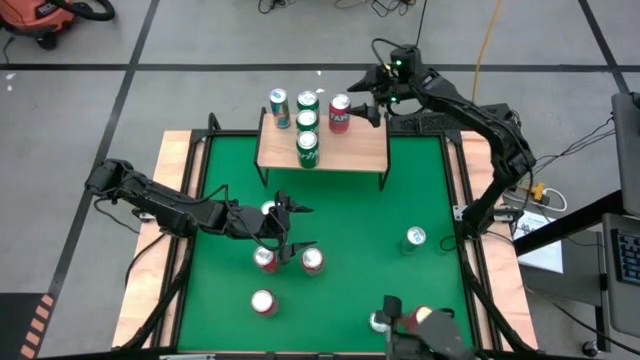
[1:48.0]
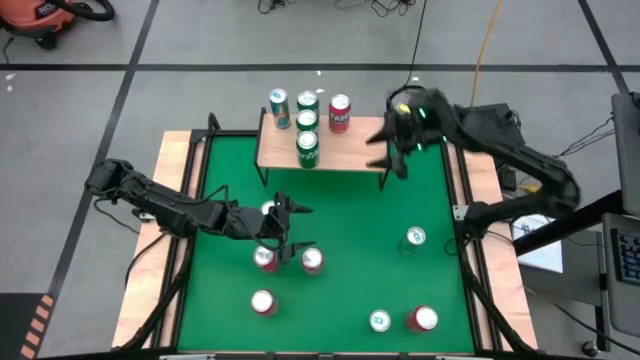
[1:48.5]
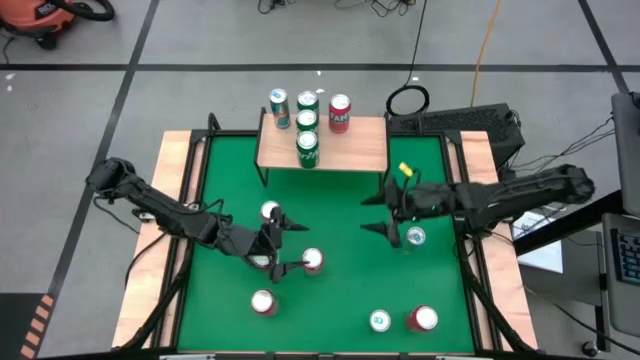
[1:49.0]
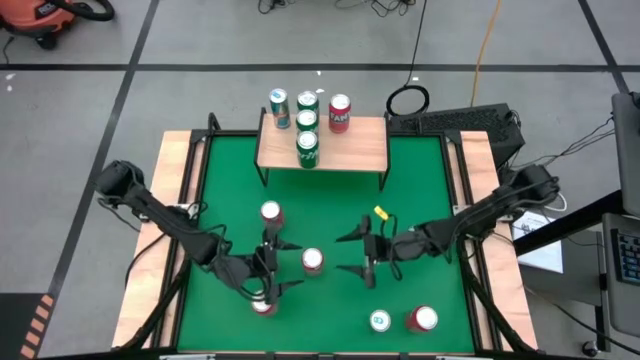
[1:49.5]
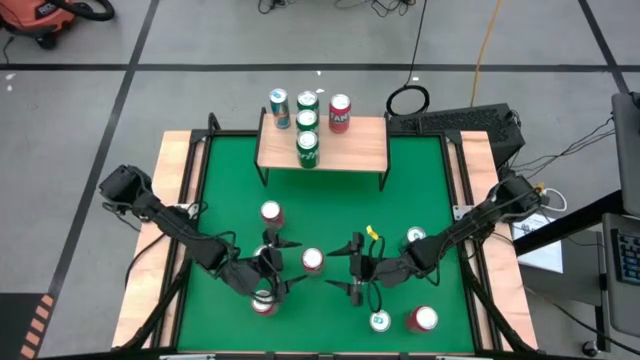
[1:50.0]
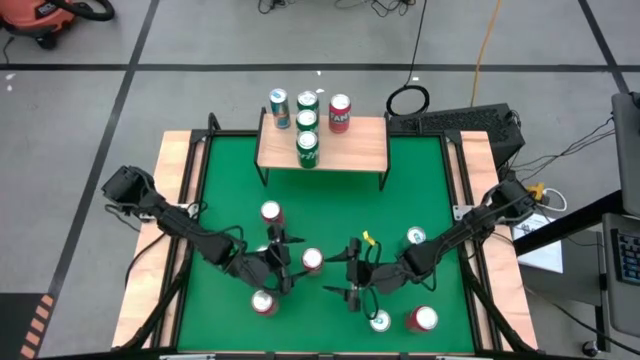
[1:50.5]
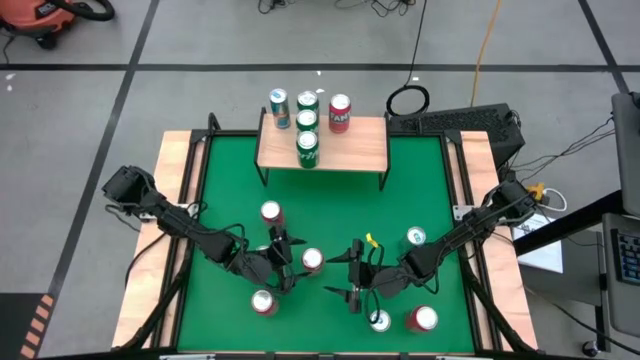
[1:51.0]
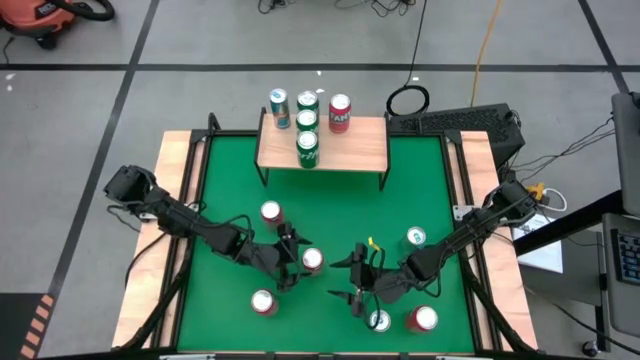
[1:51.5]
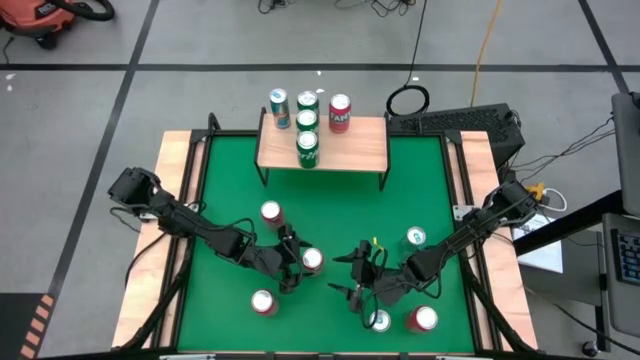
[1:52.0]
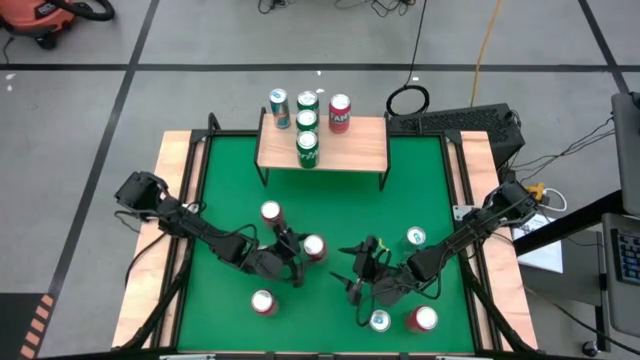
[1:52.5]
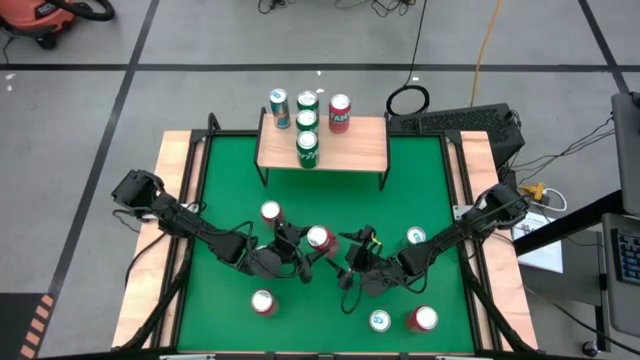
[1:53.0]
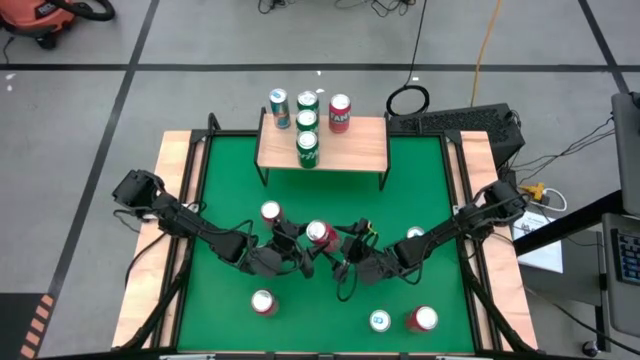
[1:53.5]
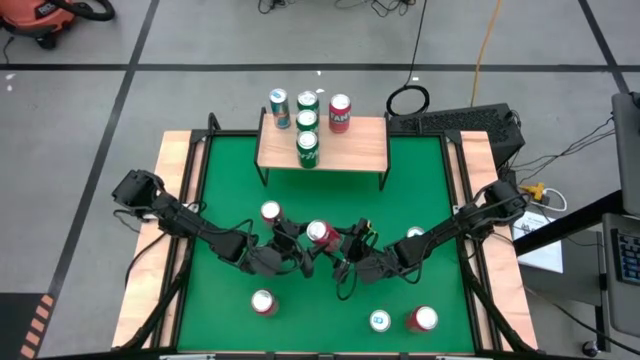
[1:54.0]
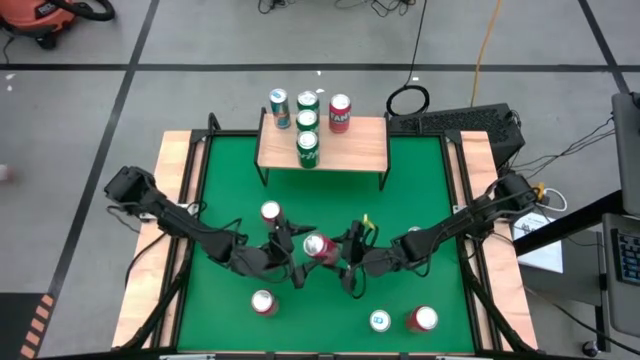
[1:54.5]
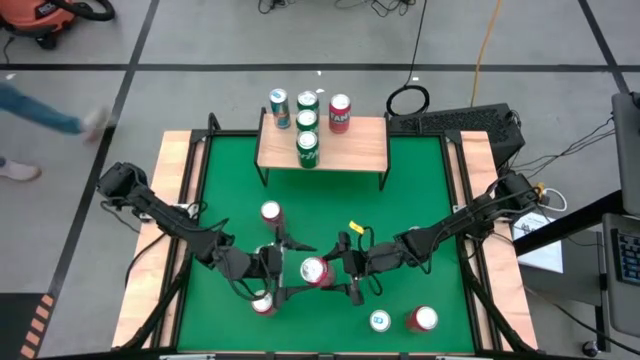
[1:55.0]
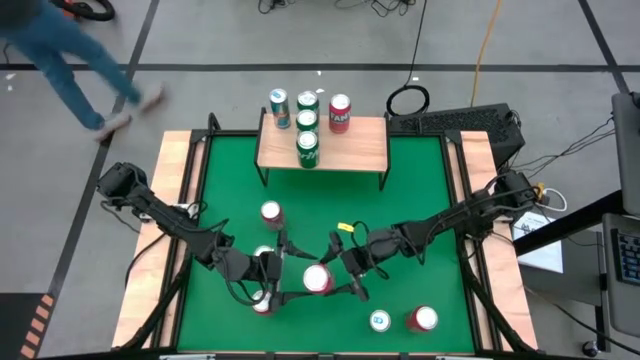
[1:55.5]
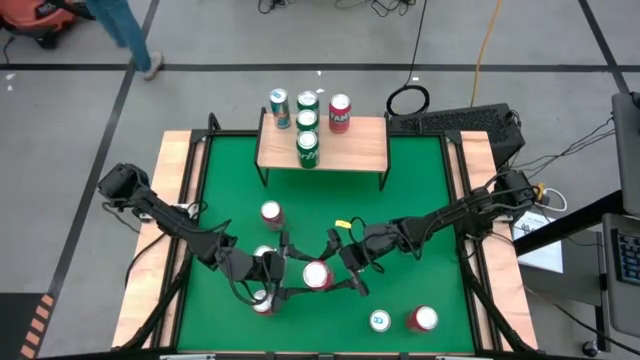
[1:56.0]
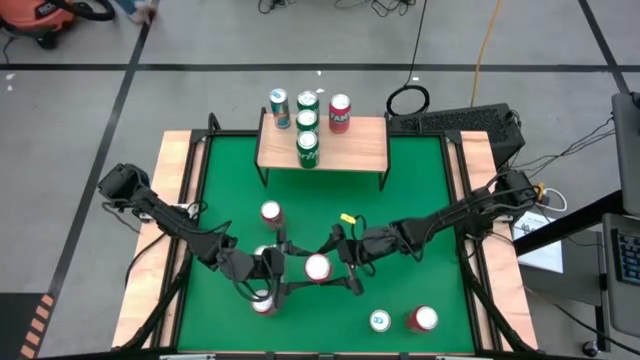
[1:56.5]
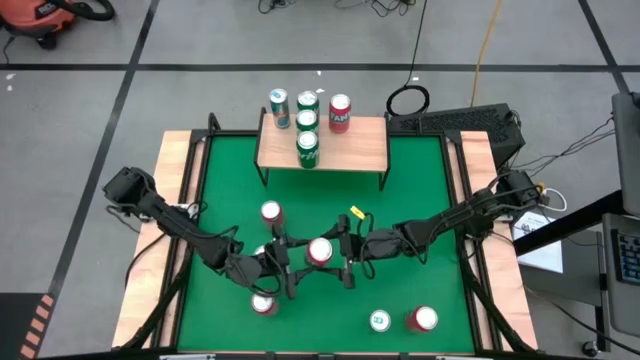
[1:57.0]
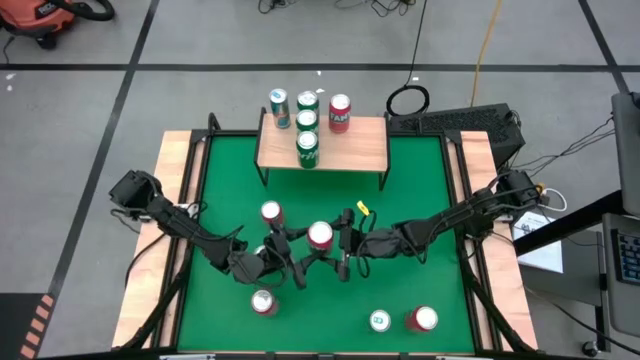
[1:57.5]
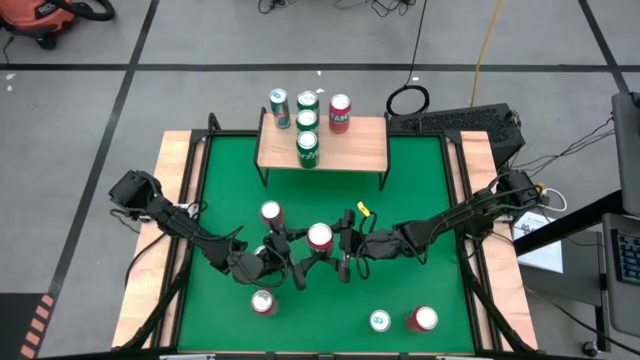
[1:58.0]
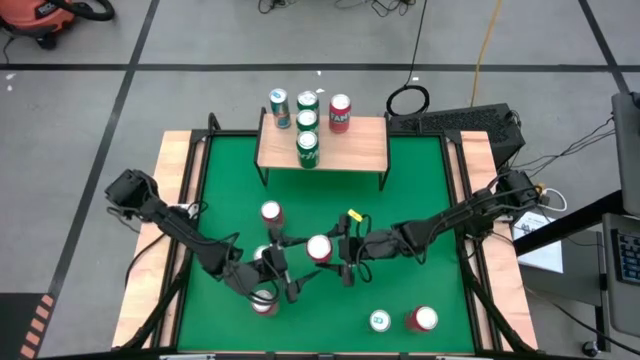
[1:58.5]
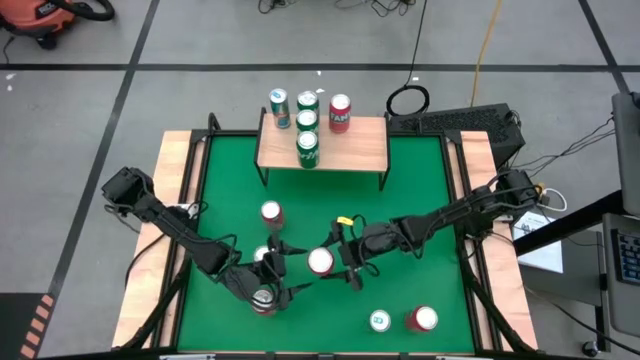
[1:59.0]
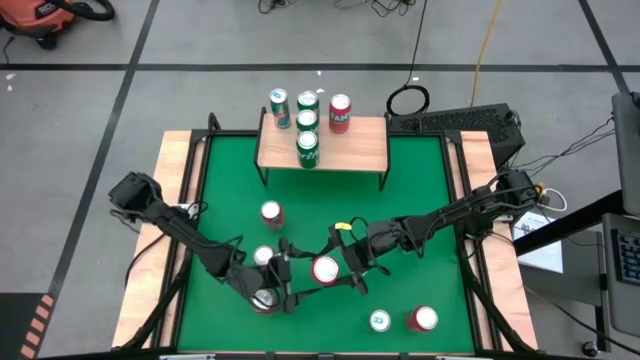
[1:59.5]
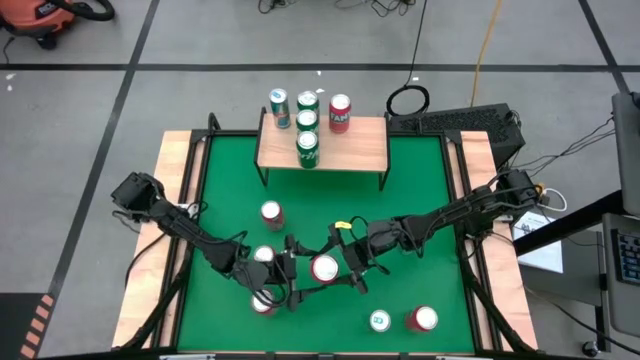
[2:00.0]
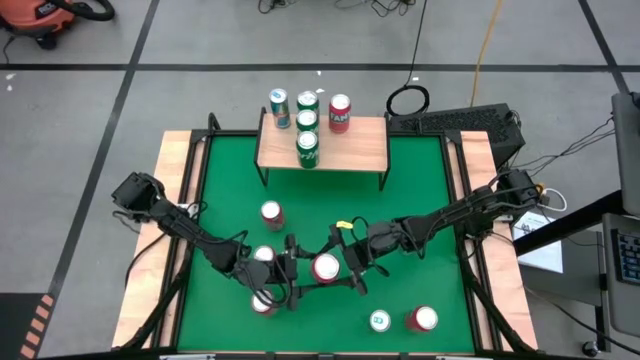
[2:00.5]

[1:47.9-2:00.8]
Task: Place canned beverage on shelf
Put the orange soda can on the shelf aligned with the other orange soda can

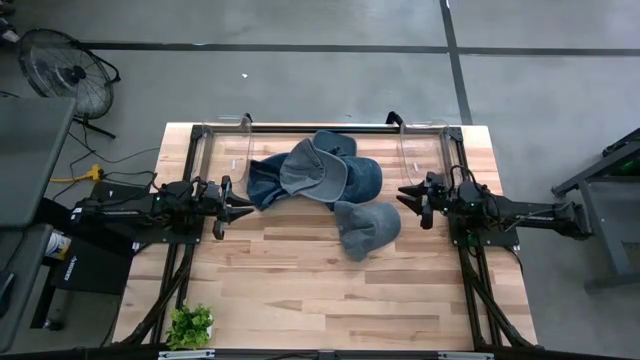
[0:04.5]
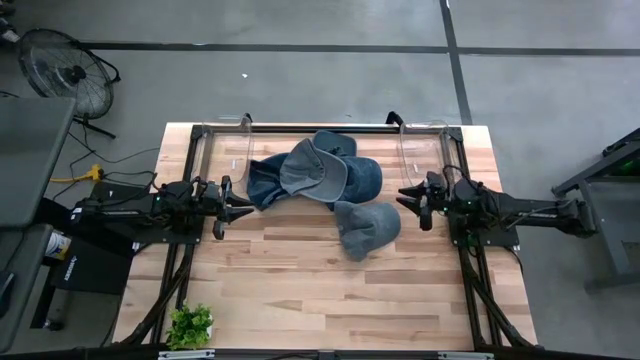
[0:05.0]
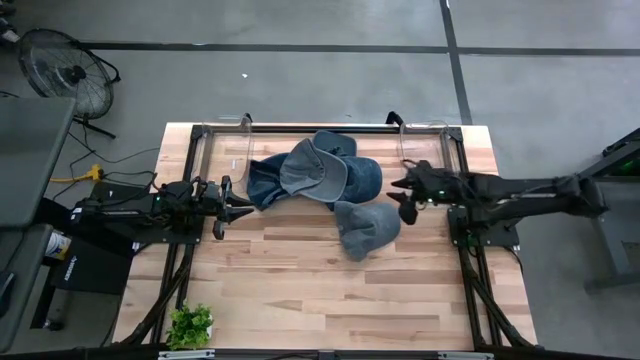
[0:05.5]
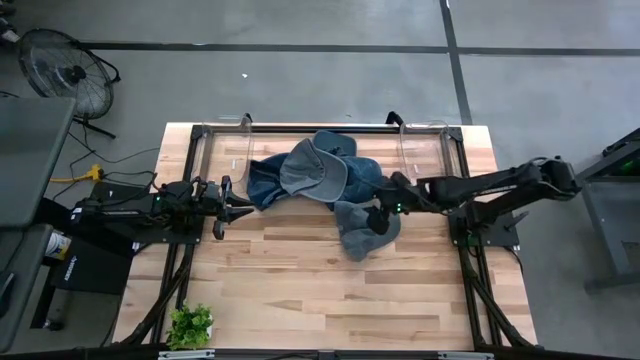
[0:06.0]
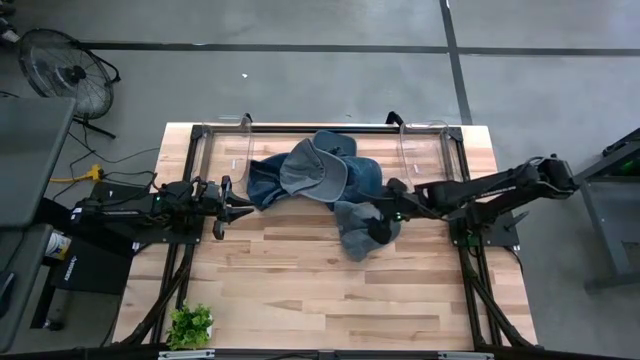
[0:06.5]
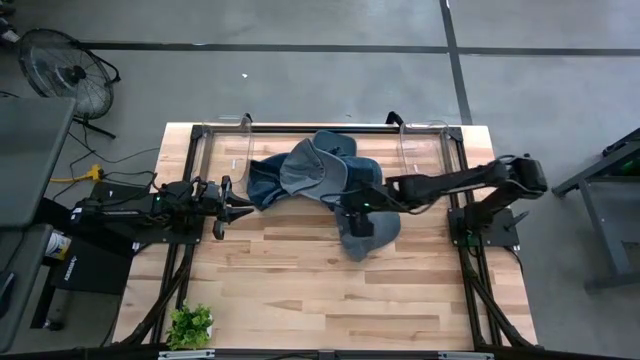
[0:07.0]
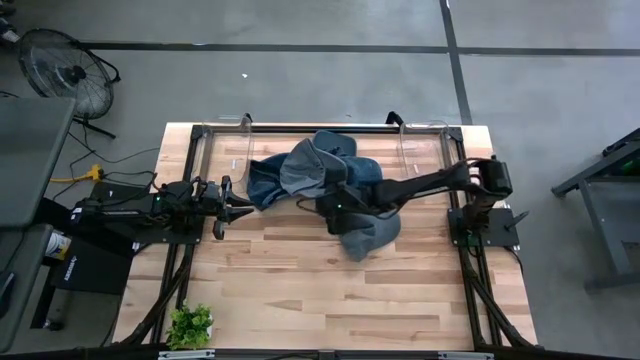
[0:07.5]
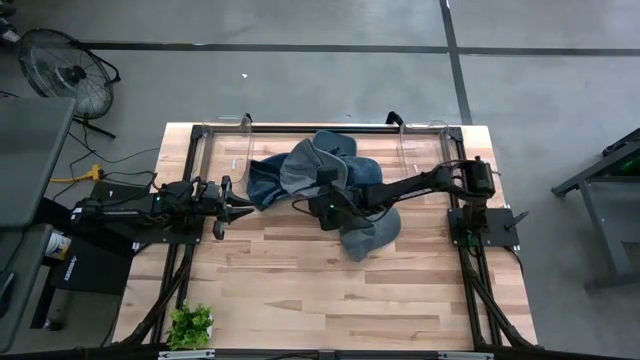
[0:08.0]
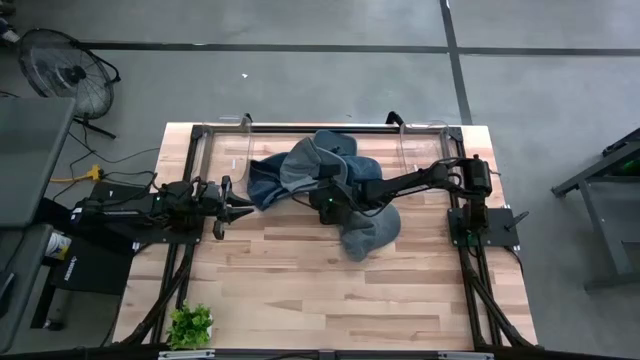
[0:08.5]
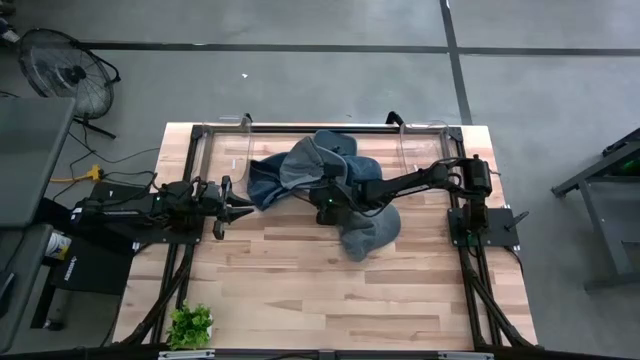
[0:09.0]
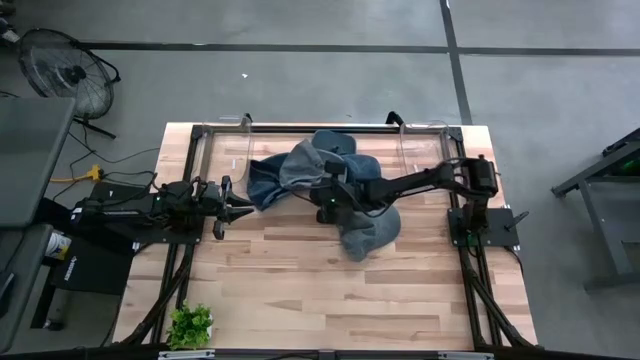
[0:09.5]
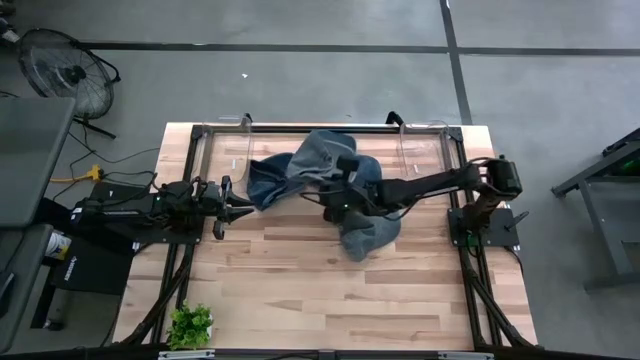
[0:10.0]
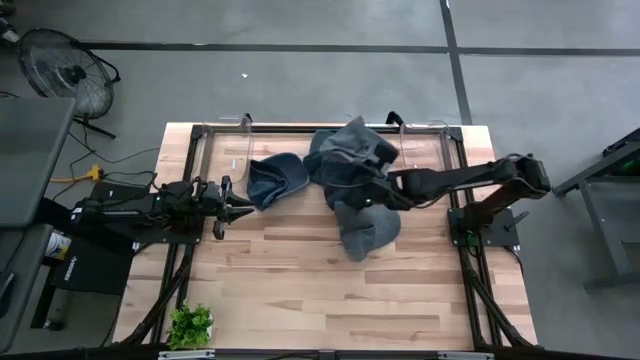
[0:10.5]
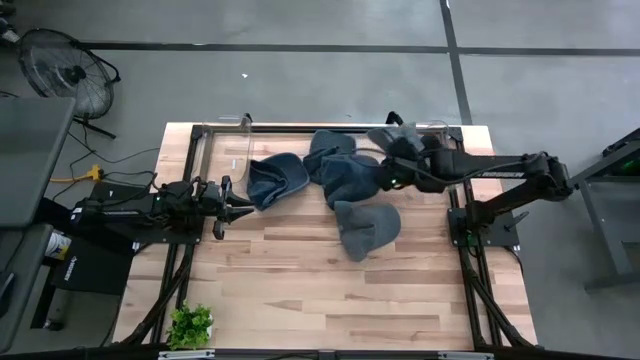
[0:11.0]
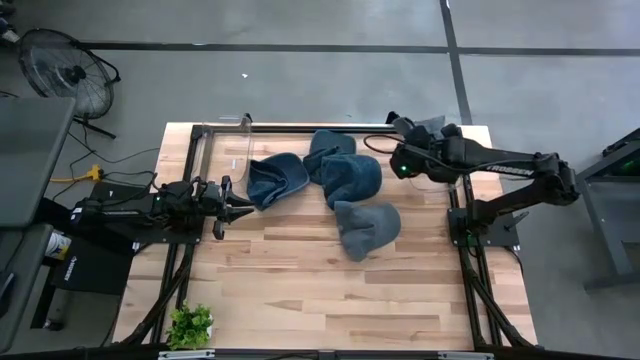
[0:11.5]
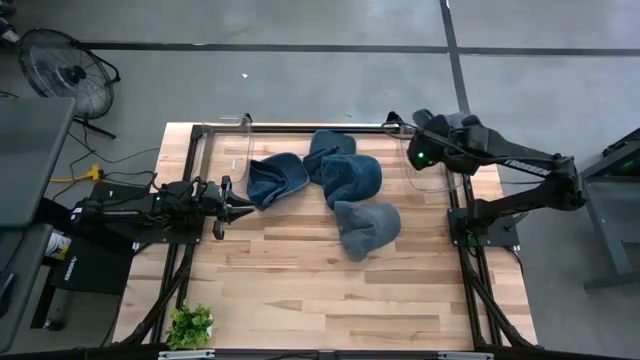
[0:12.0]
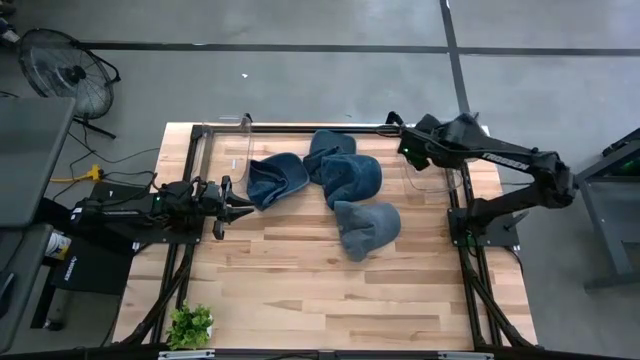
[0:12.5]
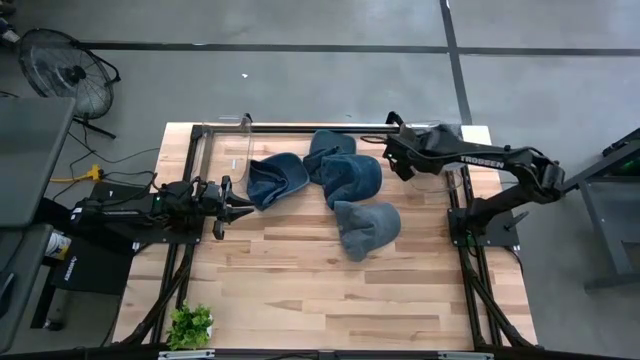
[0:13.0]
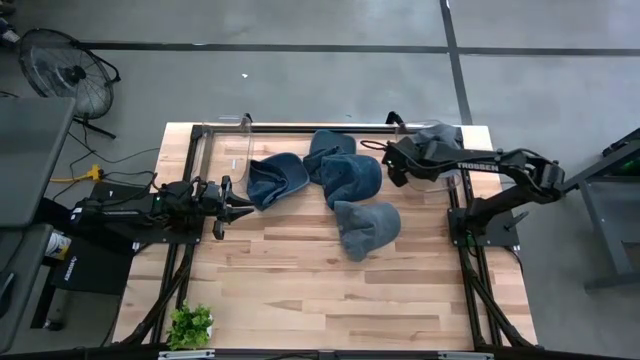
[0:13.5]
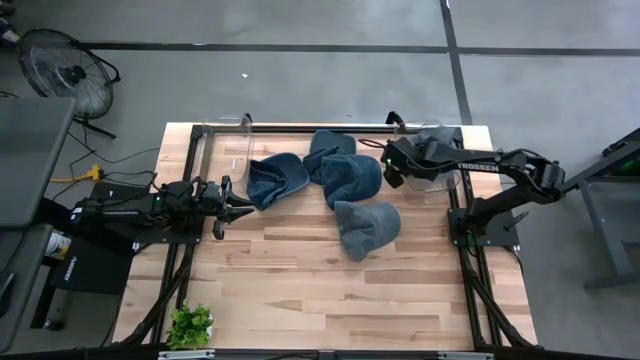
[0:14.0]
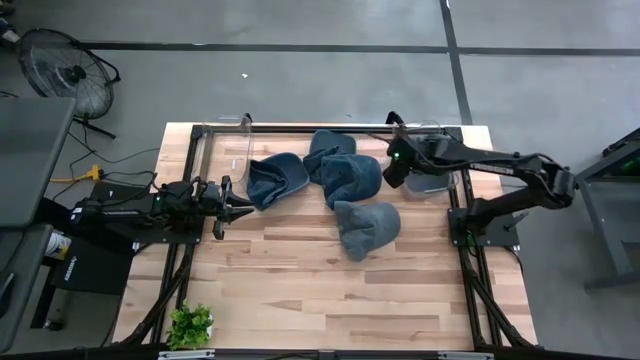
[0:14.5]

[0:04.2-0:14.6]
Task: Pick & Place hat
Put the top gray cap into the right transparent bin
